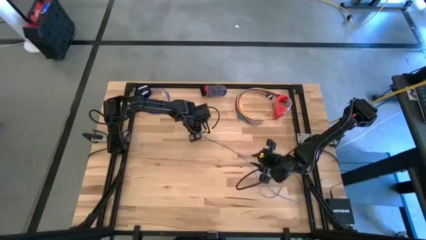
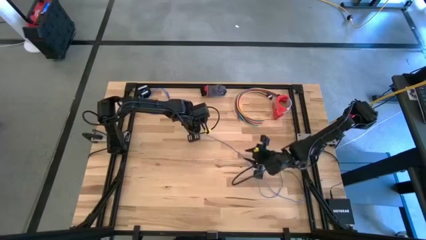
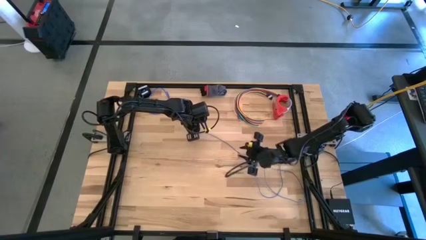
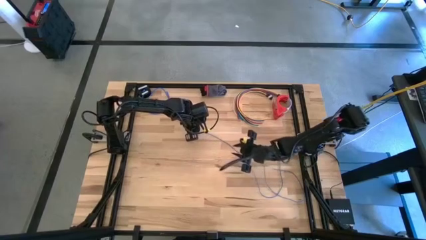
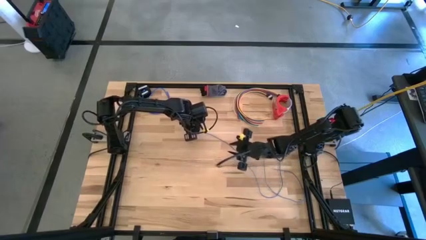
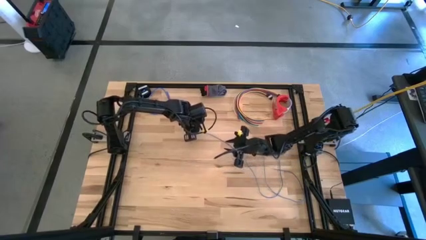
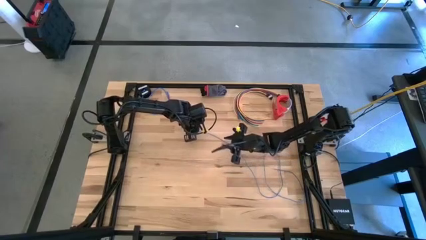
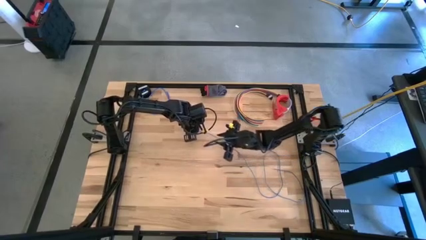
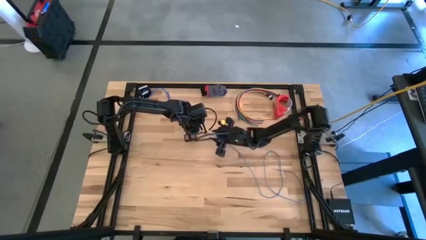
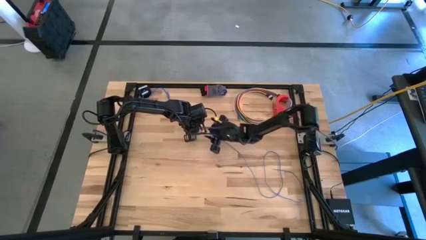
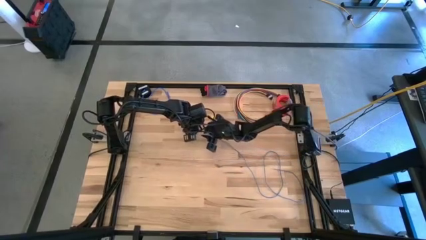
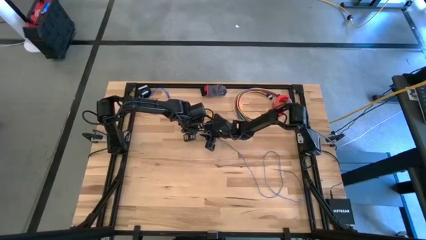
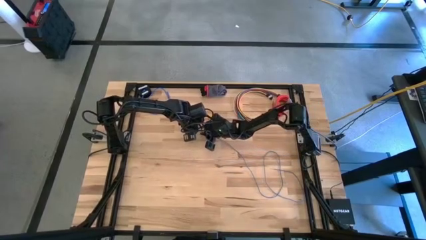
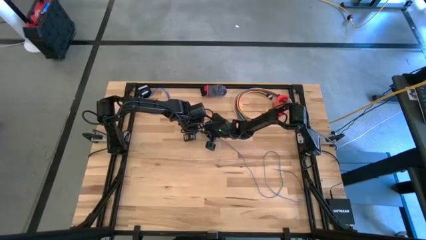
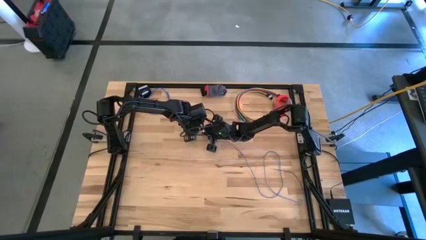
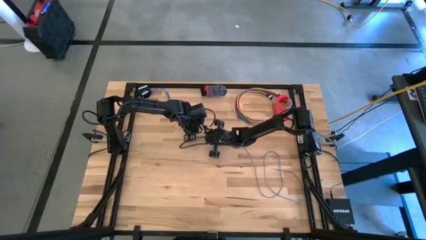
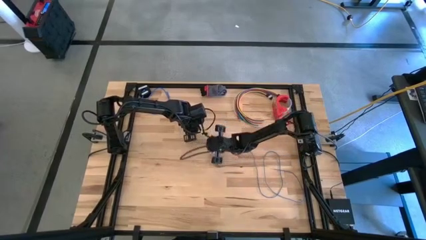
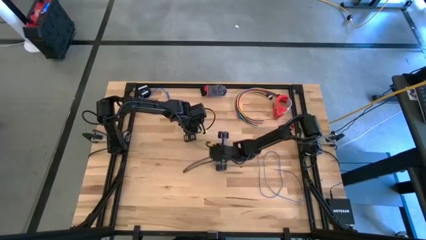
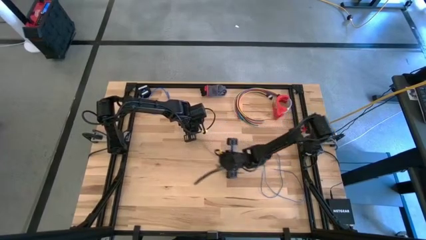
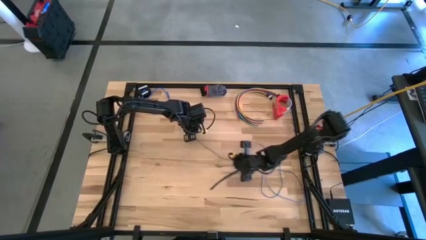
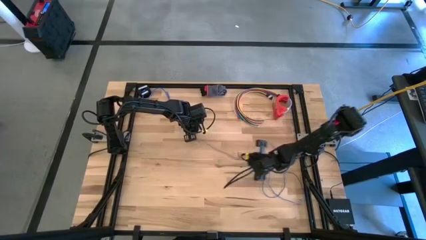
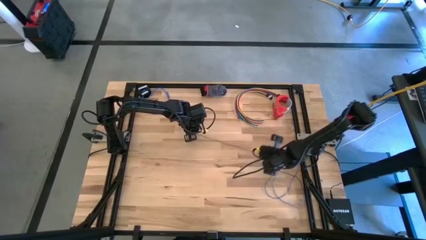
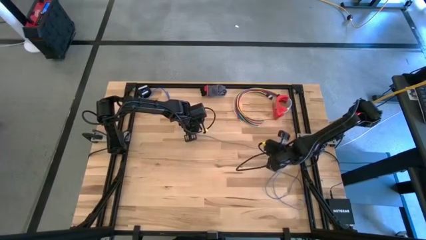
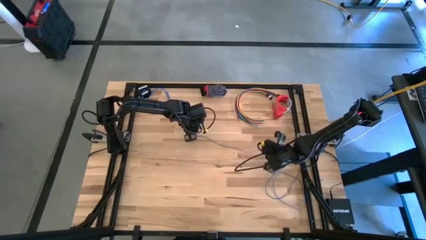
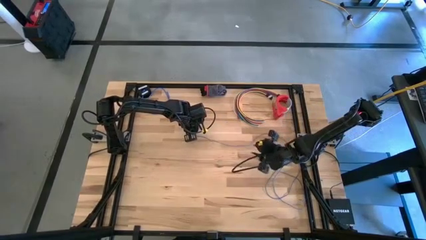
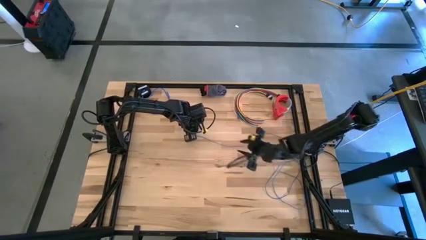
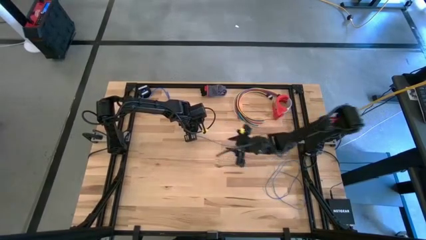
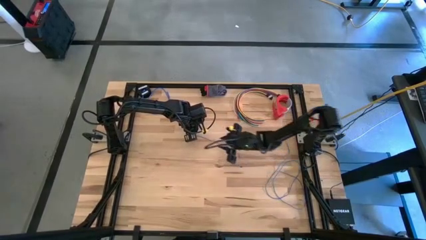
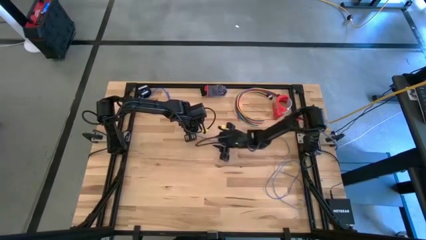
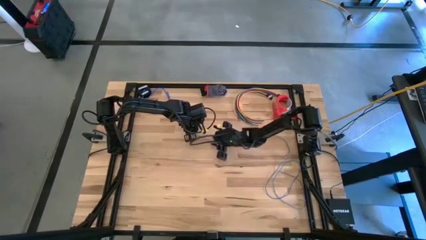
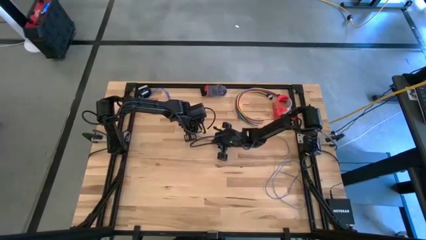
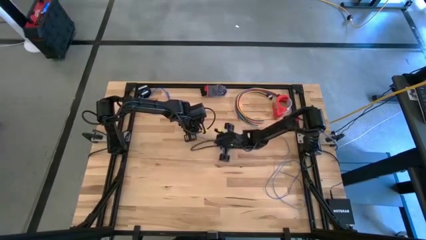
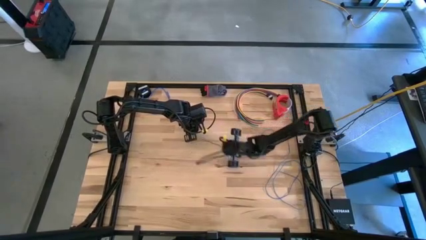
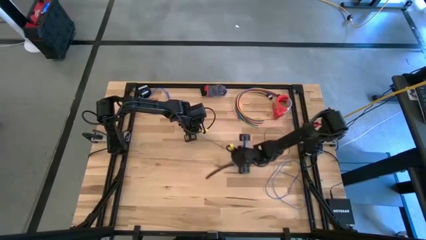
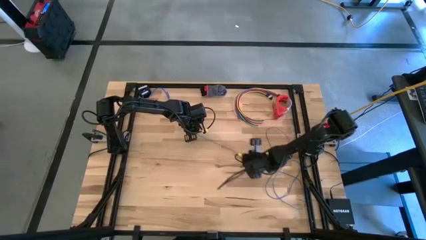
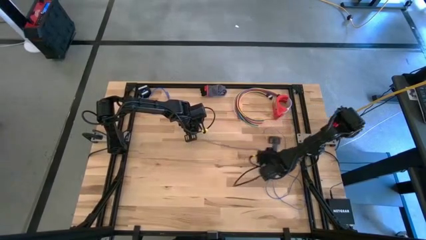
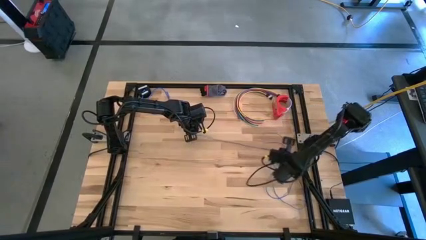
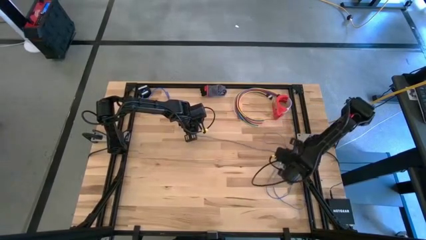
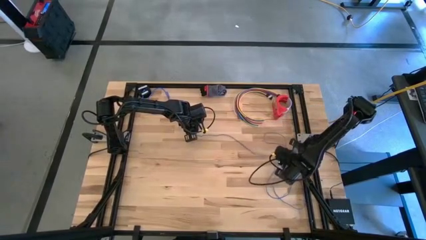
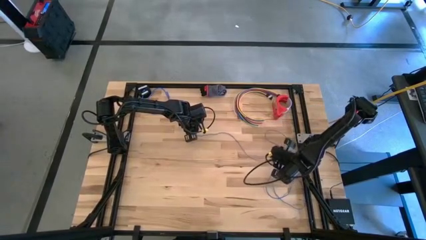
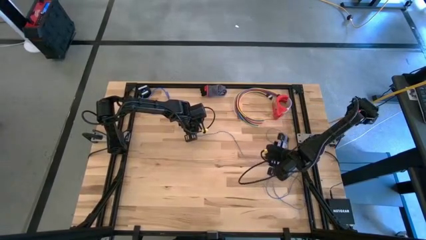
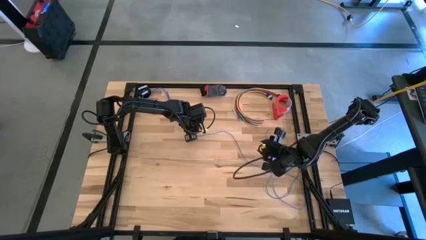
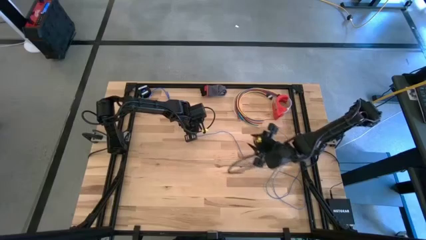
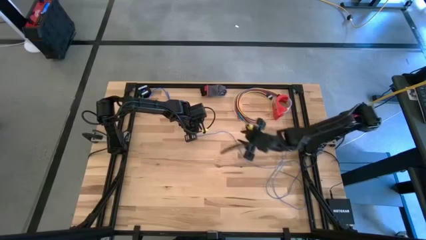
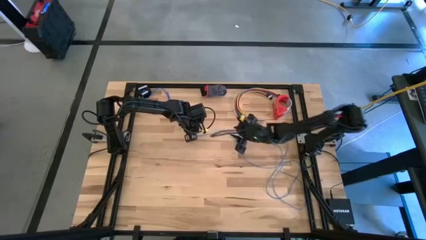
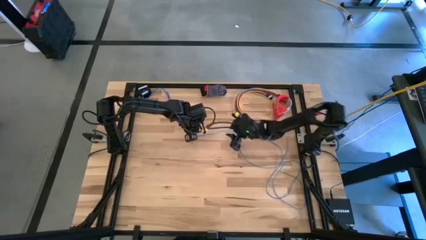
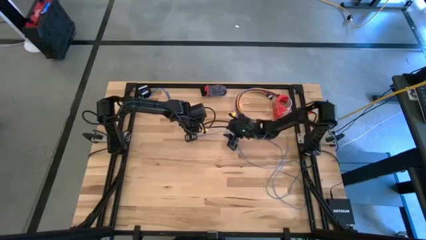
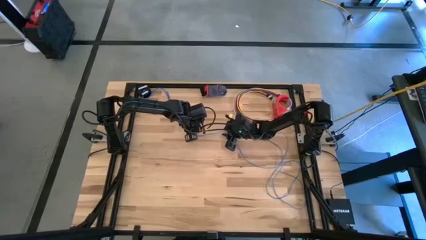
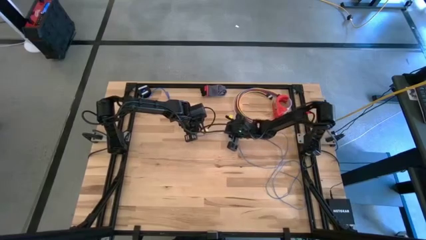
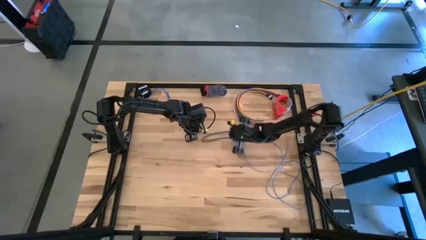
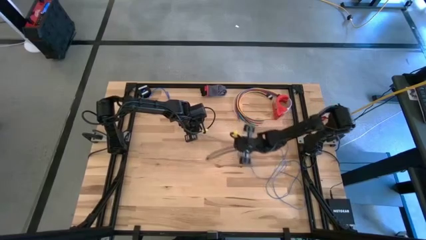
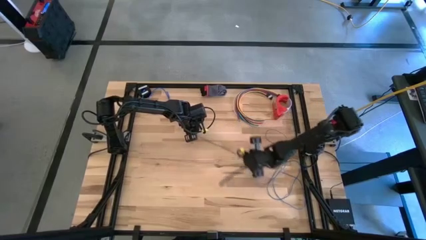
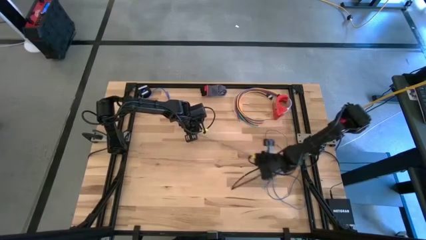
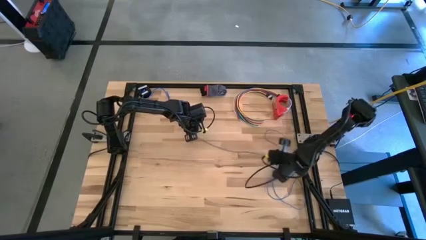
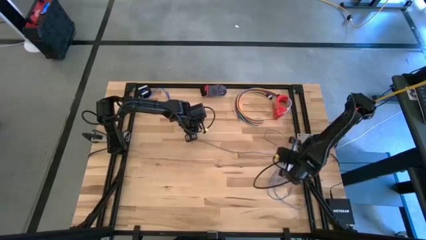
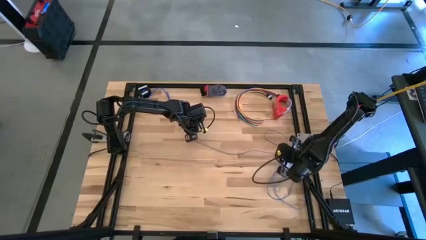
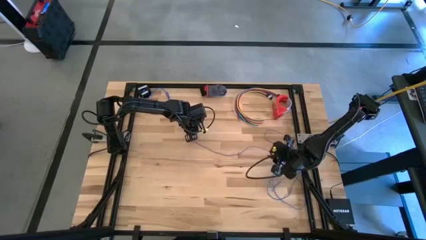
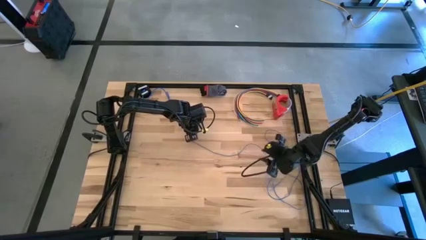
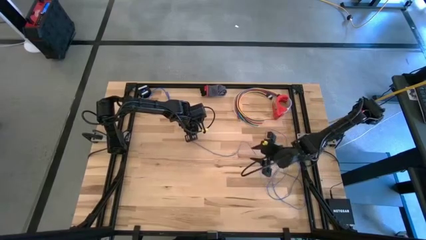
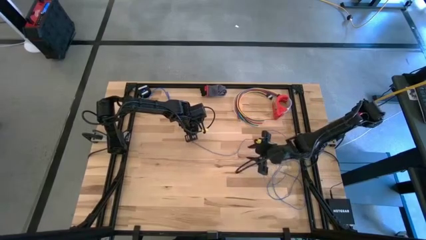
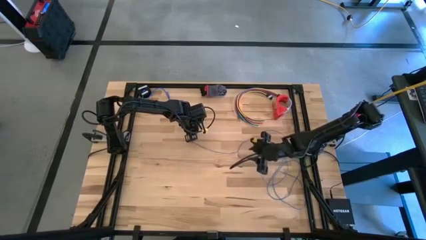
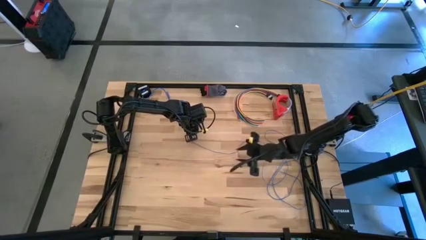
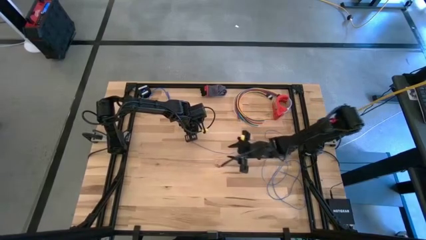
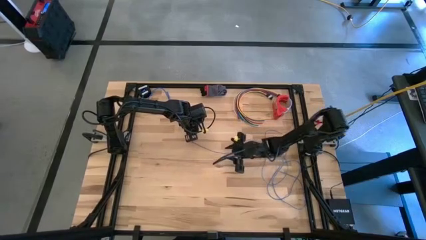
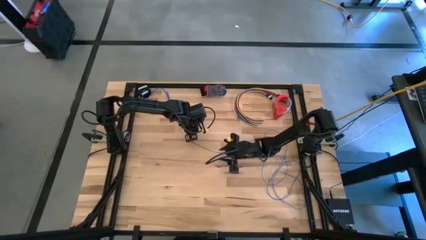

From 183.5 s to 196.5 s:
Task: Coil cords
Uncoil the blue wire from the black spool

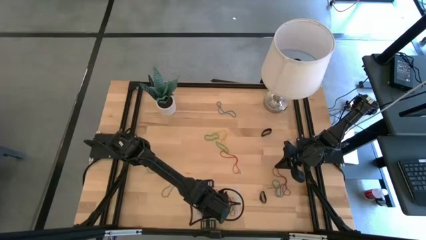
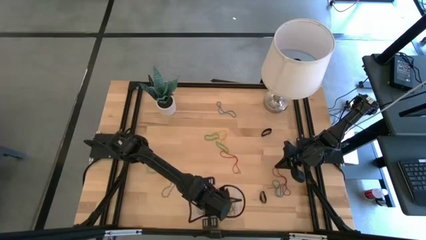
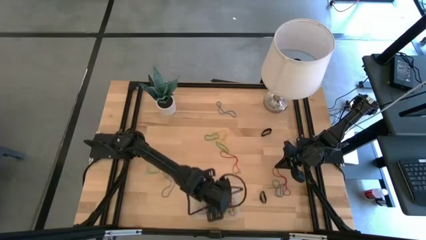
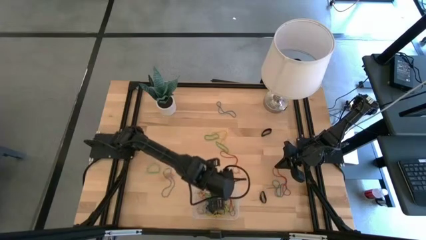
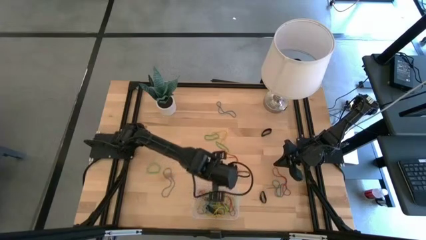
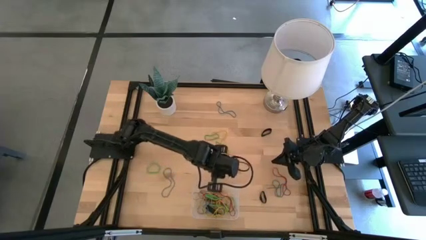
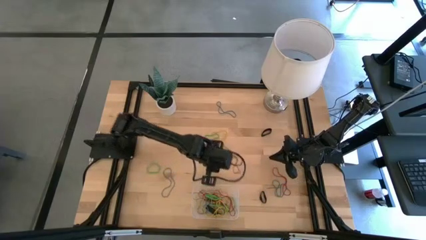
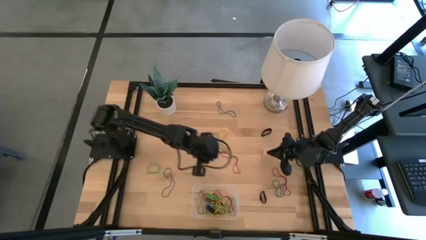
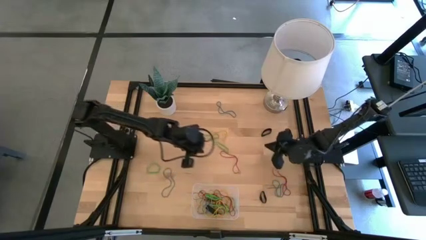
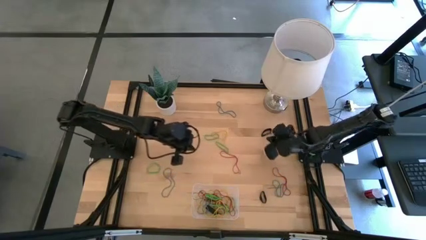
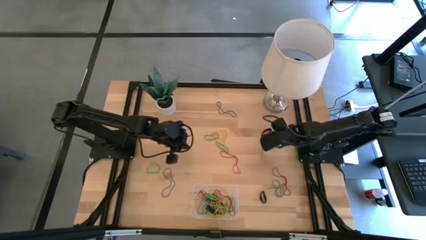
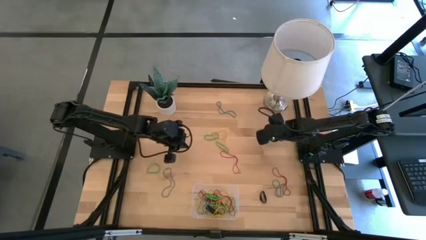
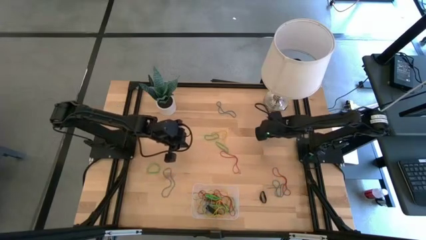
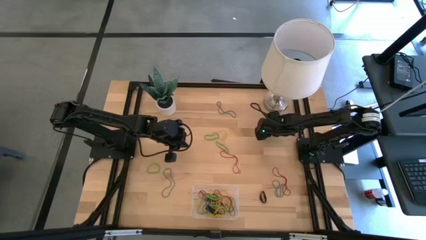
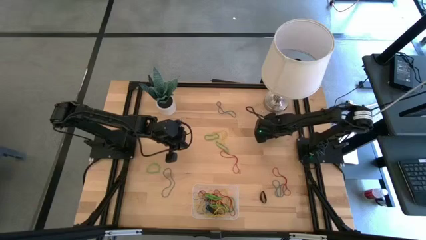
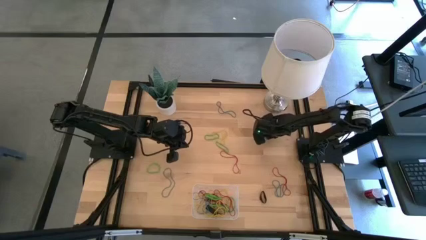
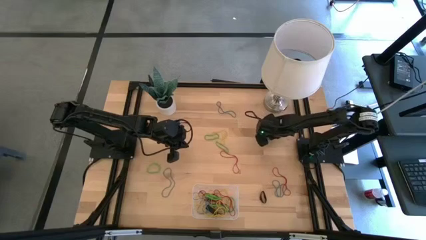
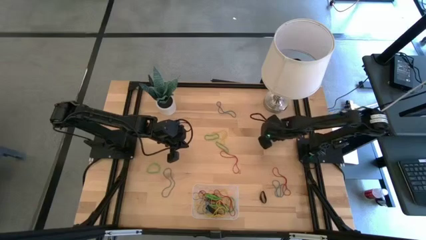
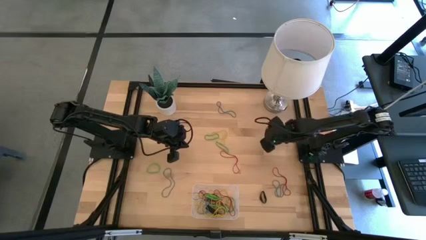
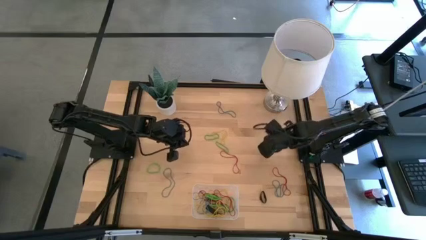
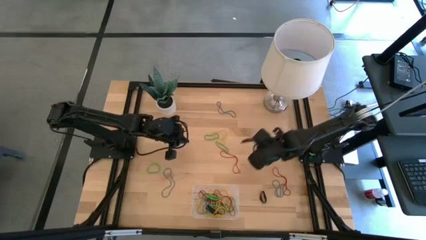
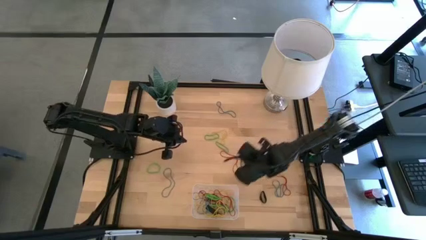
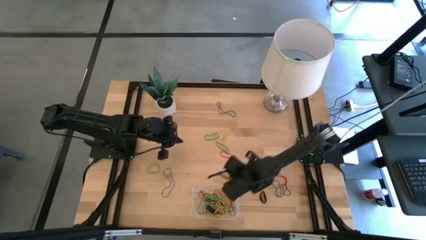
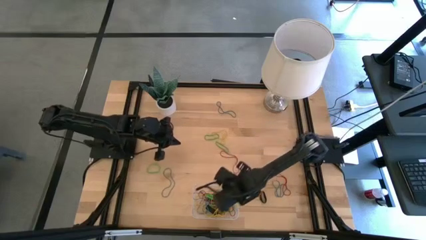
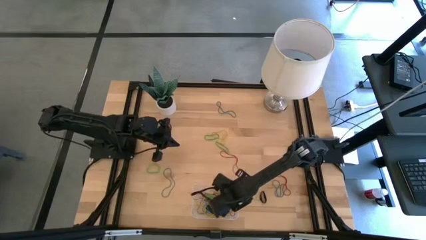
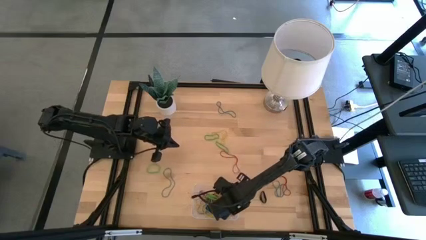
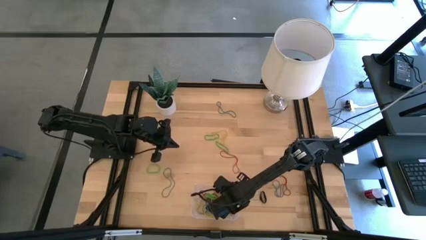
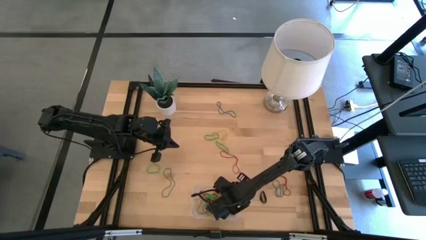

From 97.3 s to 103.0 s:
Task: Pick and place rubber bands into bin
Put the black rubber band into the transparent bin
